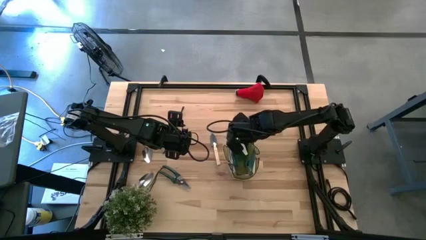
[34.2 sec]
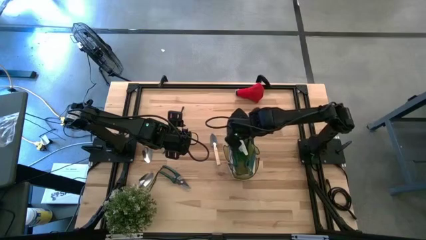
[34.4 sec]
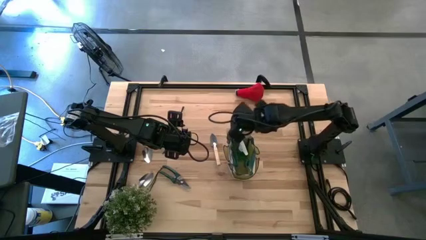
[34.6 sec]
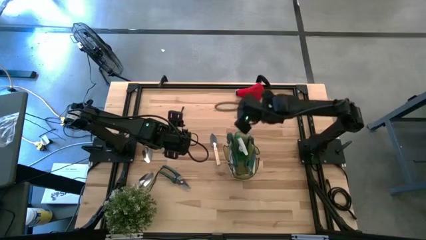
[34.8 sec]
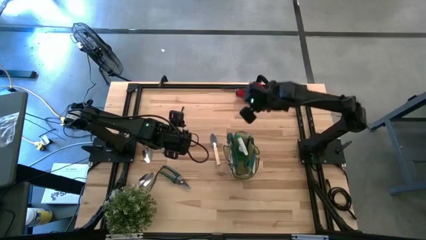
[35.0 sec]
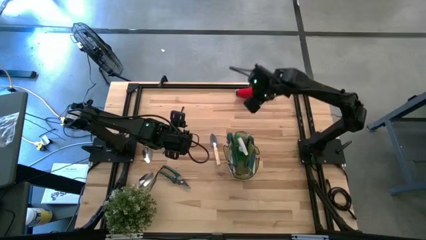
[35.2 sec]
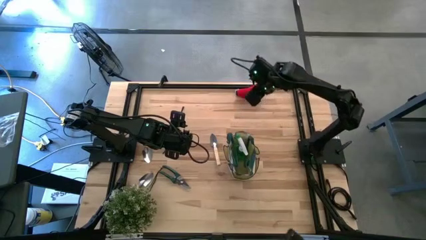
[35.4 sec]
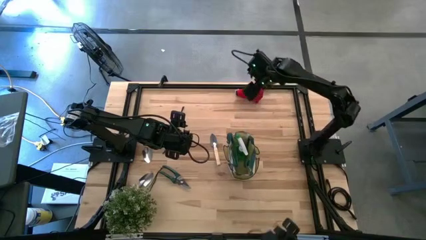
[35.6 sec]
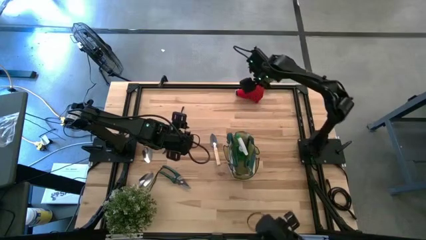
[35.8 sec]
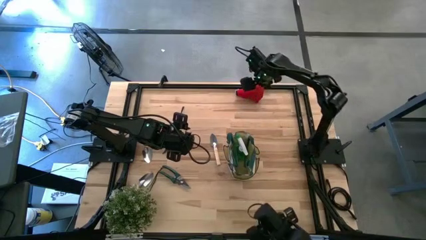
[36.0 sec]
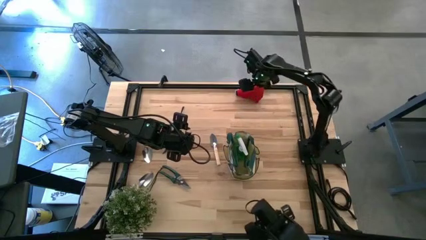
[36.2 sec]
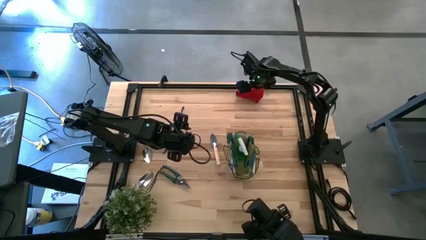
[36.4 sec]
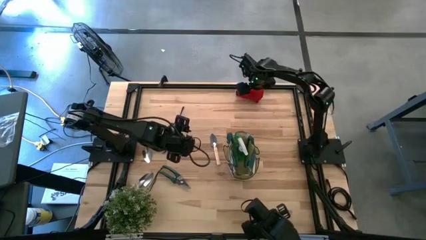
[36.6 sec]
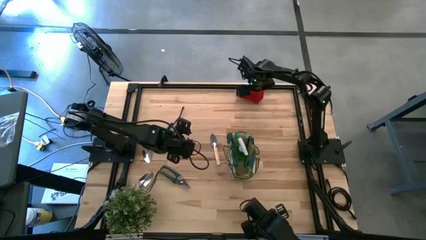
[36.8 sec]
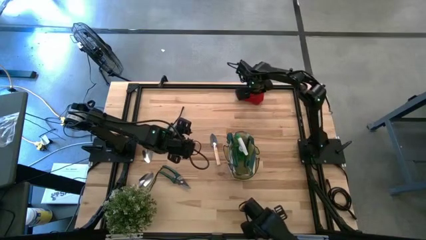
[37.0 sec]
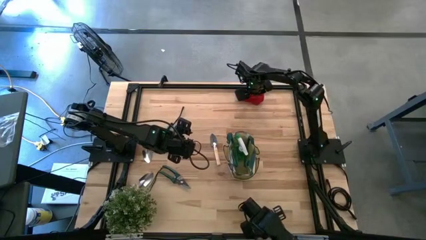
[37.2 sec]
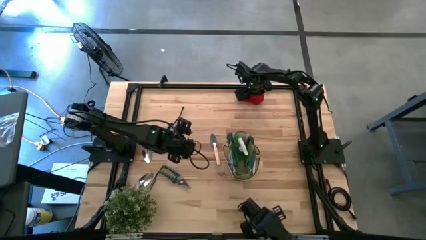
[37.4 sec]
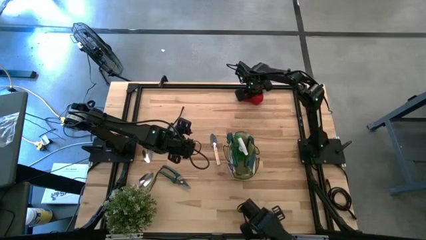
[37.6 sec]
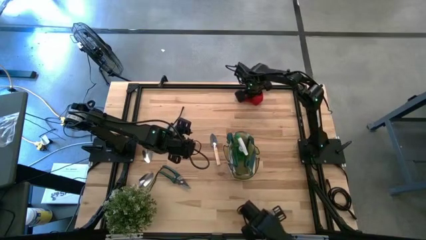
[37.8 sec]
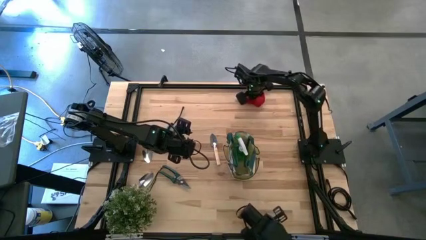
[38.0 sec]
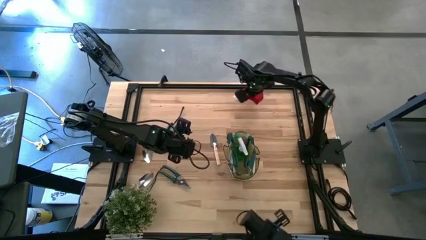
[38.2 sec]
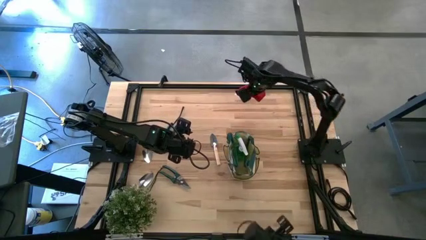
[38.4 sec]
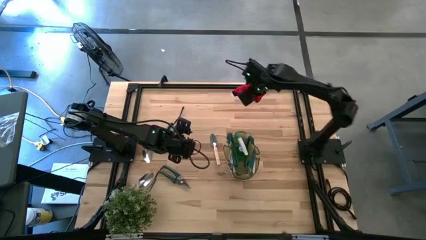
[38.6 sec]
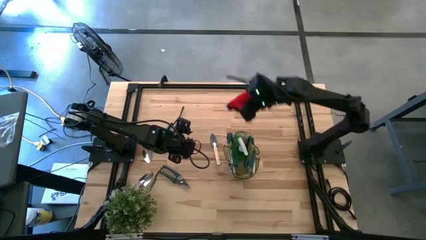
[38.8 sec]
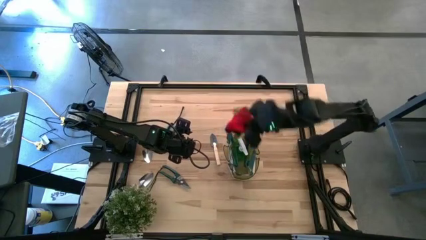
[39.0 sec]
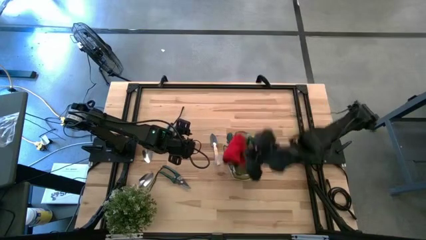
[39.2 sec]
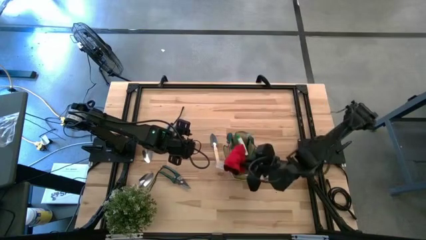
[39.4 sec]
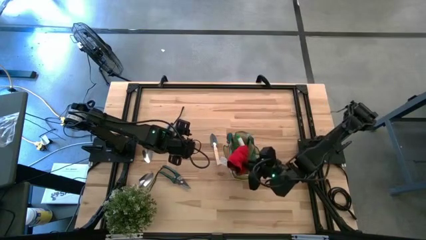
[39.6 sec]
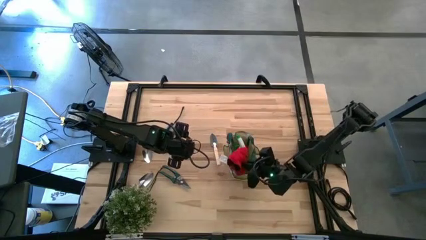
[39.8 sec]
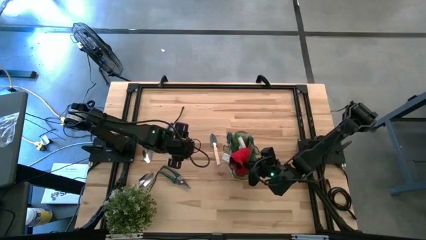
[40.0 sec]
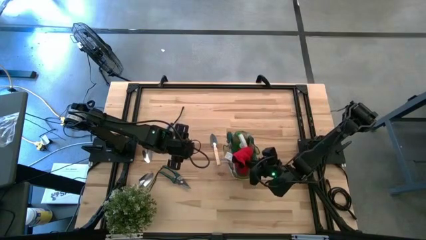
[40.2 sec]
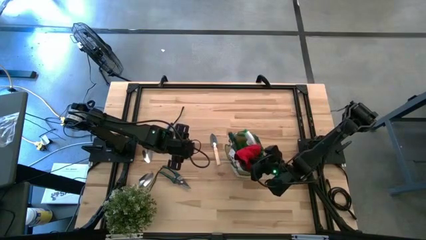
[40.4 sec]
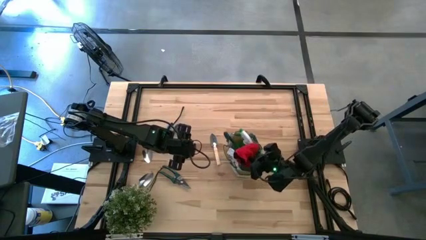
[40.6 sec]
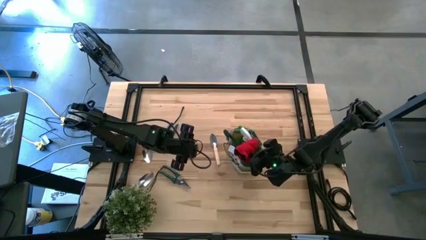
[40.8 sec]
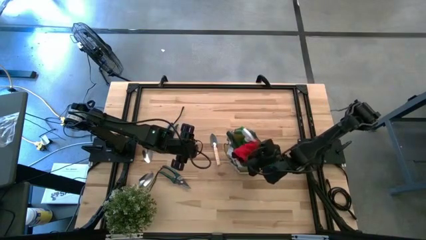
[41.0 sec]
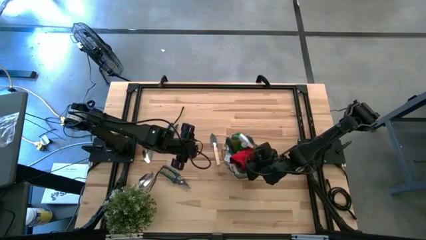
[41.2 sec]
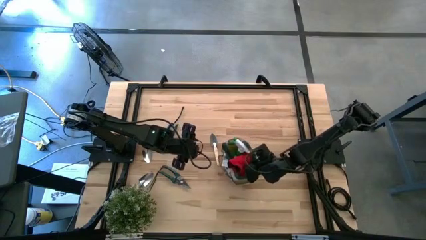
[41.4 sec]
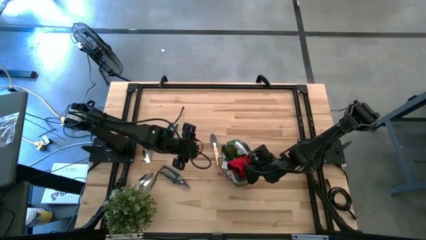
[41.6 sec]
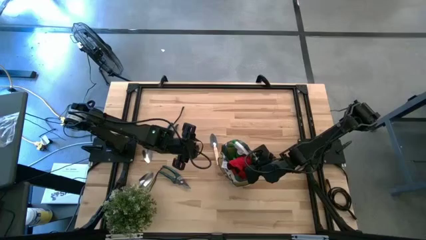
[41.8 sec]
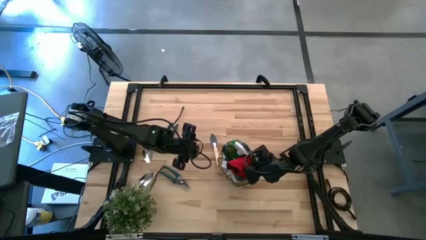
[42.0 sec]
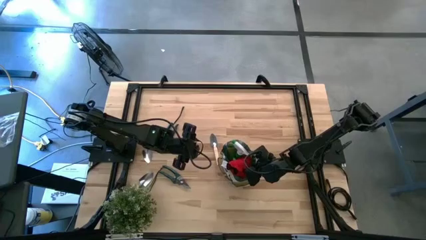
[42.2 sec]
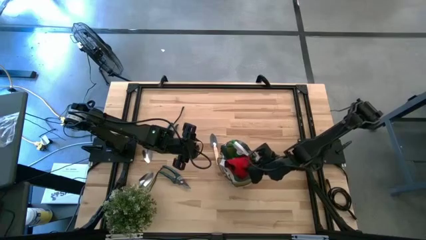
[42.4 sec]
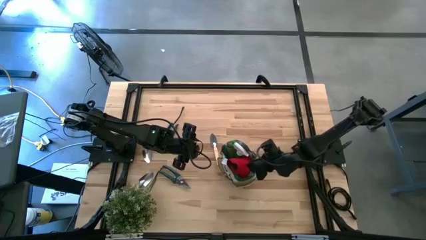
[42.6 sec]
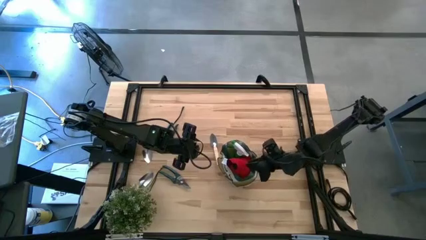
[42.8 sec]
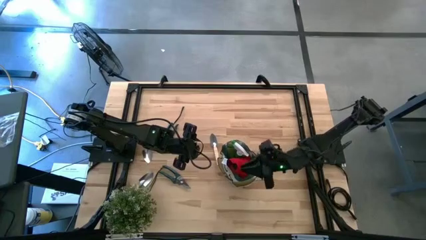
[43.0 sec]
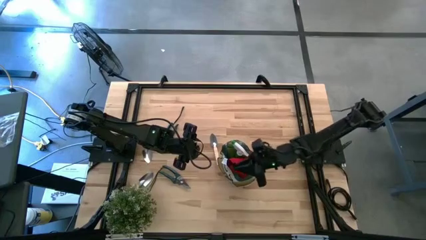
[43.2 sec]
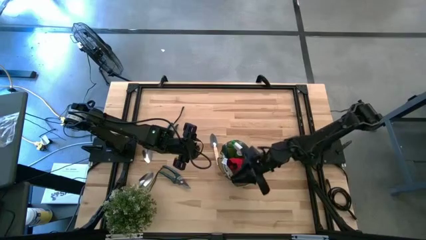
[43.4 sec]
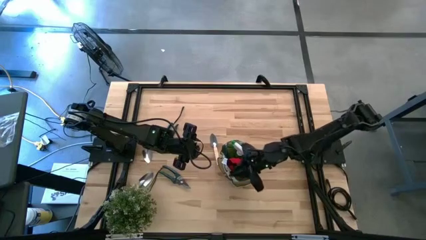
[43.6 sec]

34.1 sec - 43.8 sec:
Task: Pick & Place Garden tools in Gardening bag
Put the red gloves into the green gardening bag

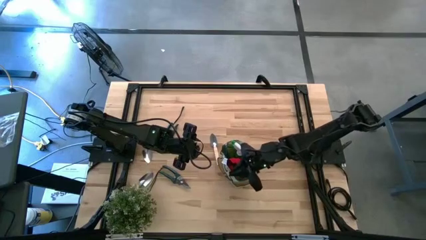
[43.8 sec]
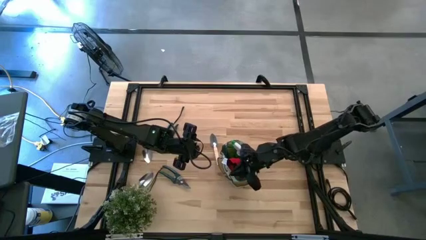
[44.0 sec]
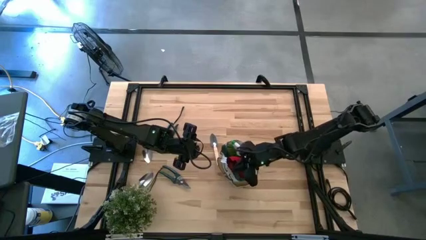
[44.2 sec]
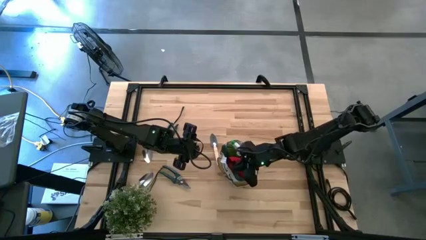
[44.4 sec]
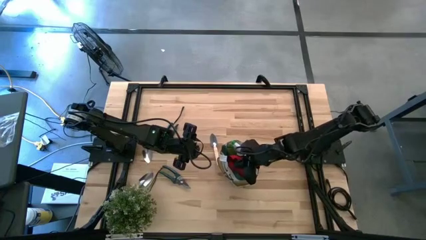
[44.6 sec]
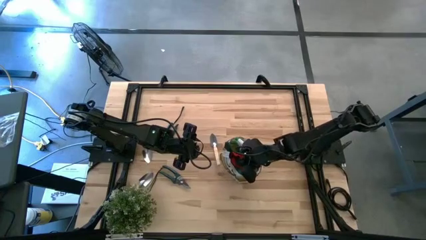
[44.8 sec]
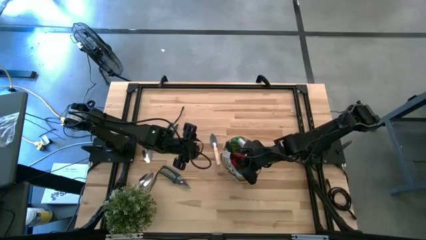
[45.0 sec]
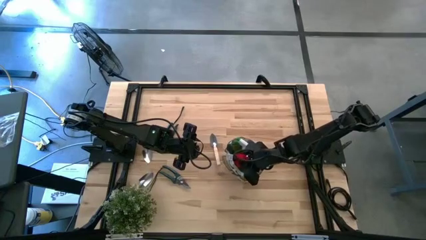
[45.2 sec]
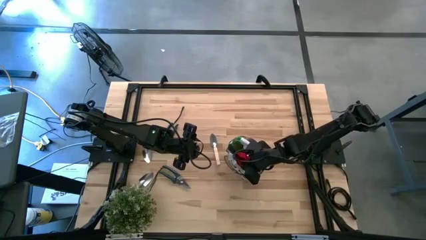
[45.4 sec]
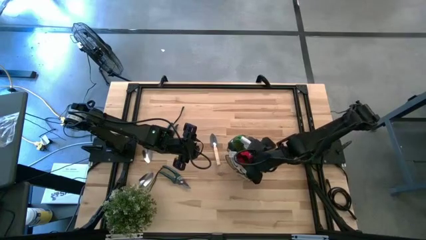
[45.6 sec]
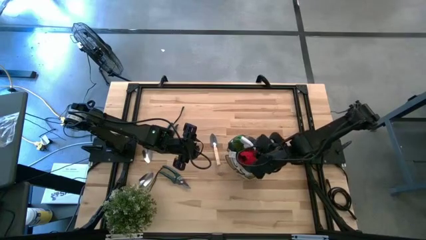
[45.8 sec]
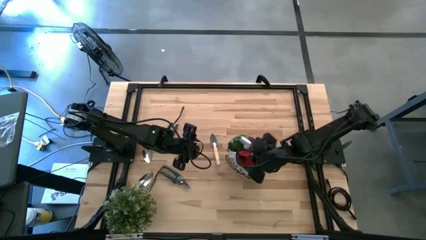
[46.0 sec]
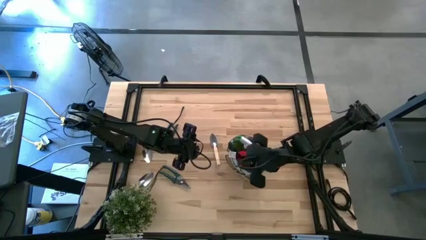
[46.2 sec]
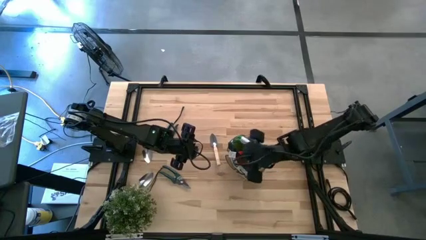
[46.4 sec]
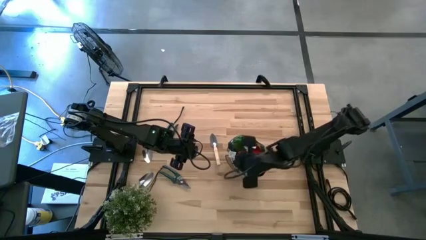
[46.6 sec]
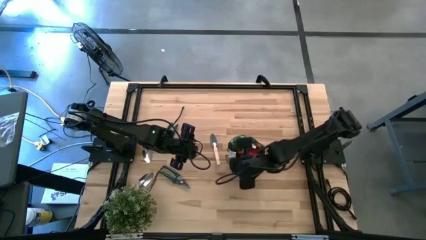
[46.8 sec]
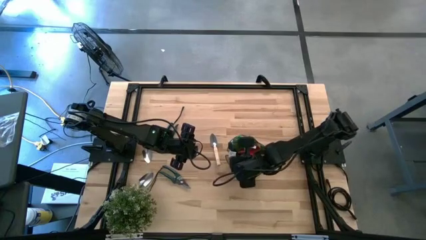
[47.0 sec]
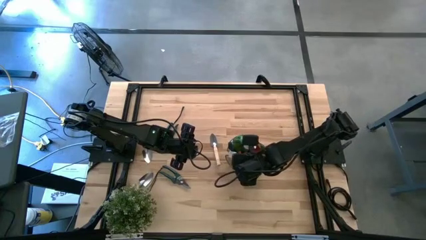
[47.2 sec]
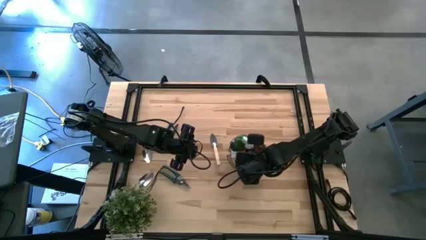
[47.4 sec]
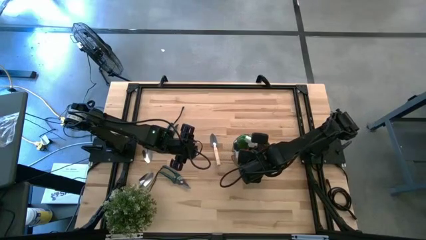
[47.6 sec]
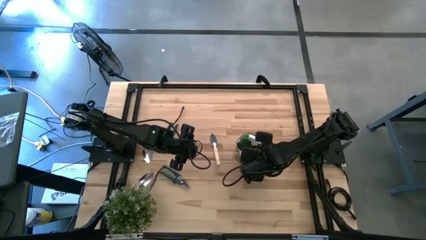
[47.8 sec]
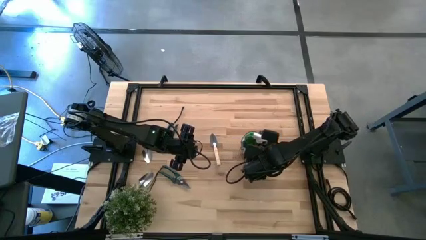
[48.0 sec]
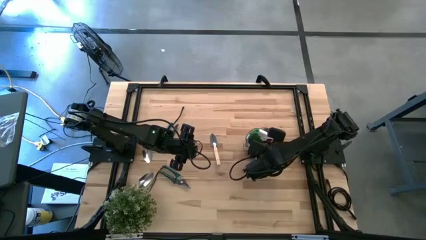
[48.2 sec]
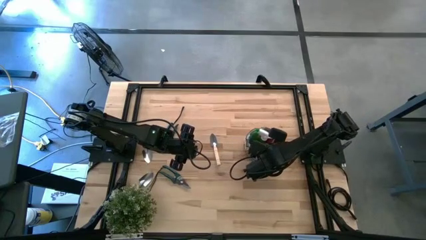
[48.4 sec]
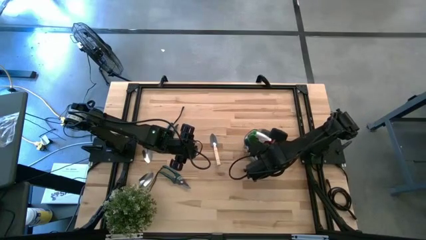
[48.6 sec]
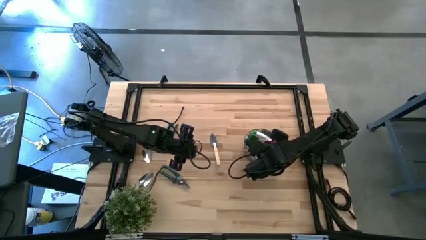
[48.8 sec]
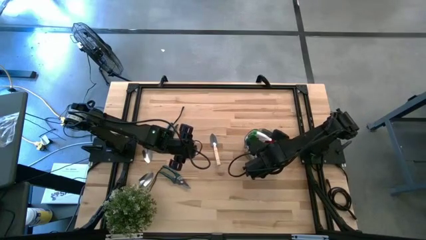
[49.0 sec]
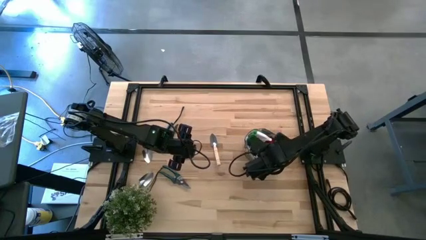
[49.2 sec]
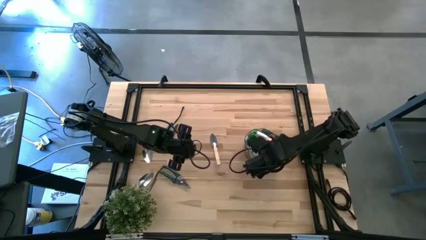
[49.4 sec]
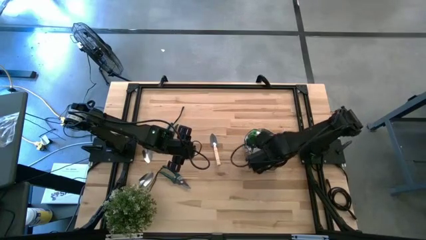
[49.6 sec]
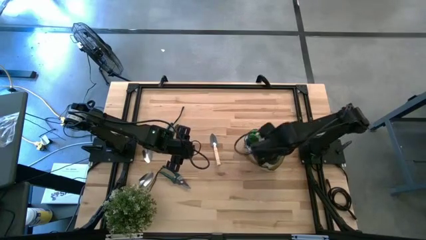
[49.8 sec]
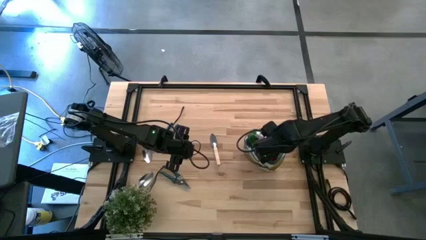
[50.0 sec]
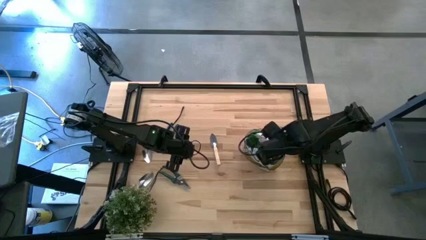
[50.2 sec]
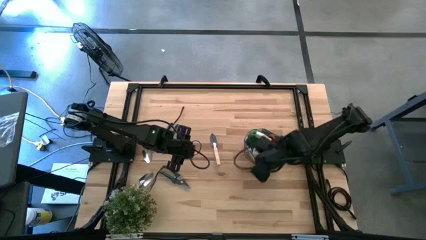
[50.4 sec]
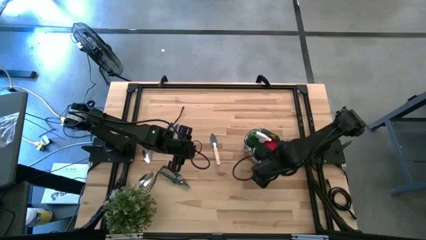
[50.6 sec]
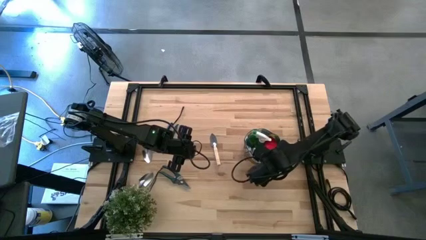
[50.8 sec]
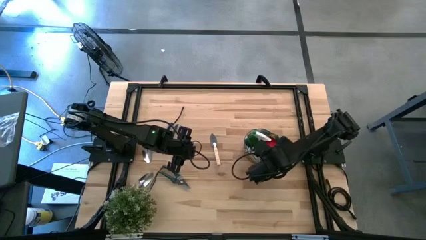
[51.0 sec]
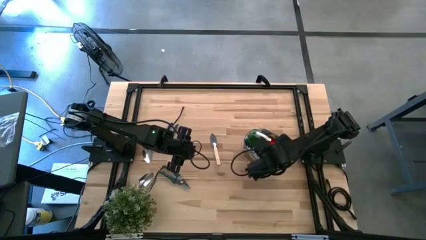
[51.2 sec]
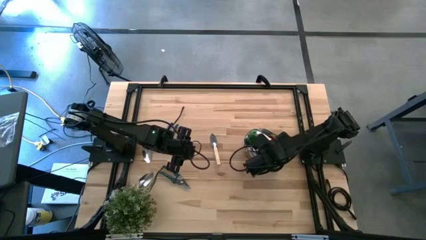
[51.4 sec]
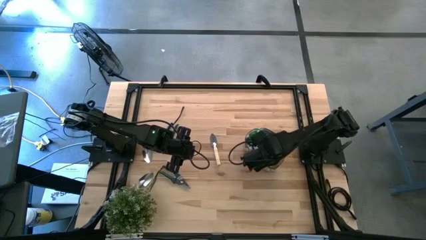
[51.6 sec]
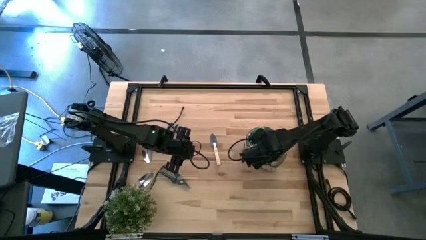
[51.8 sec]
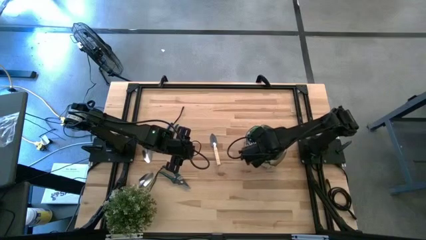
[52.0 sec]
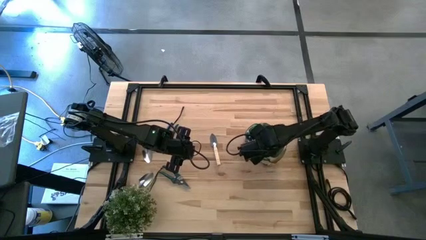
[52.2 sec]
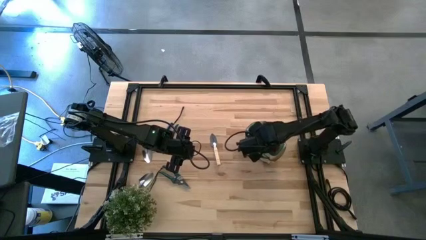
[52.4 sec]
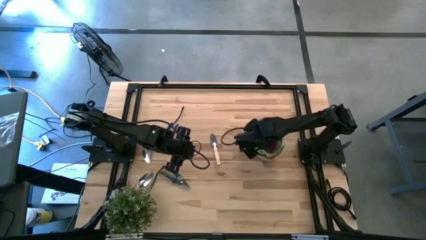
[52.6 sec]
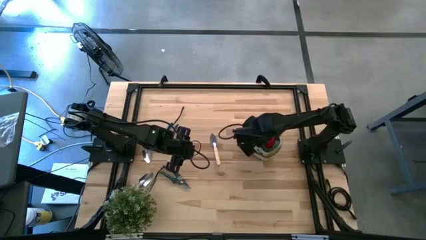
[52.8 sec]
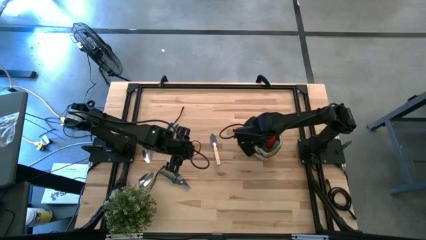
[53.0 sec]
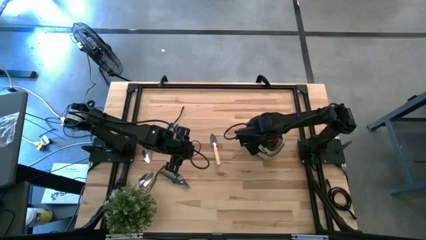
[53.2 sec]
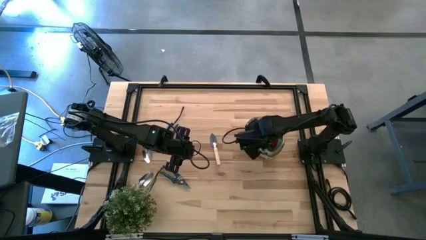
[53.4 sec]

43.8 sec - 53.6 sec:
Put the red gloves into the green gardening bag
